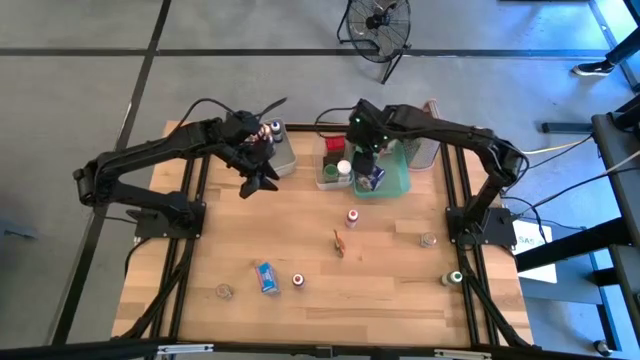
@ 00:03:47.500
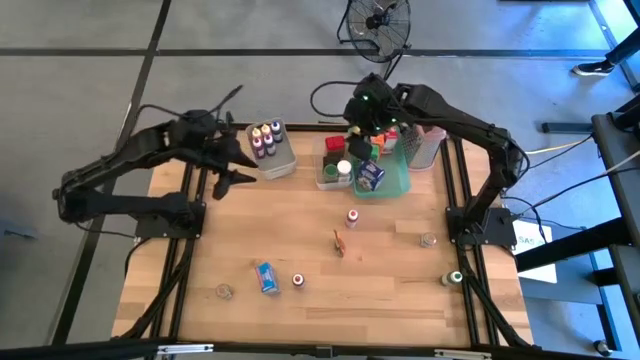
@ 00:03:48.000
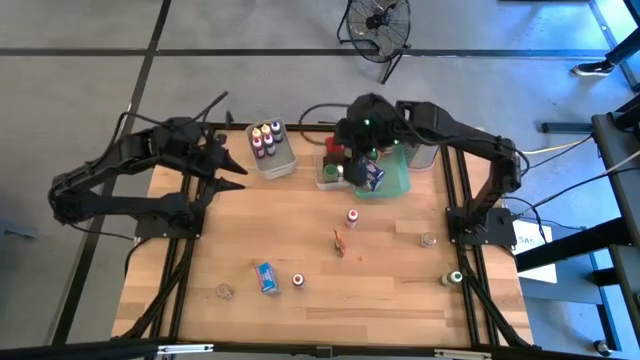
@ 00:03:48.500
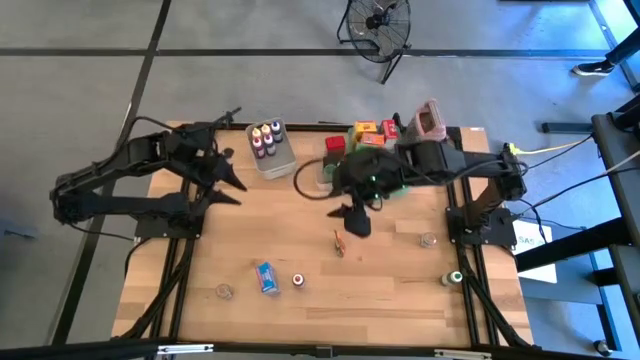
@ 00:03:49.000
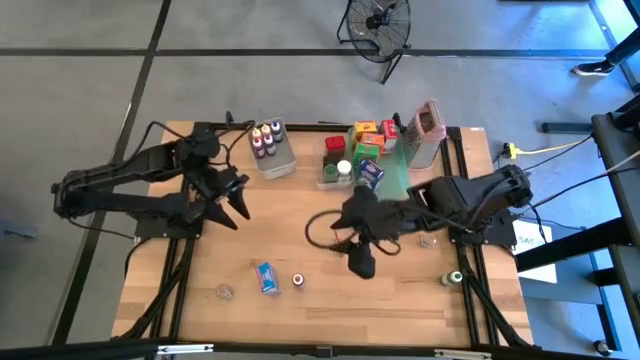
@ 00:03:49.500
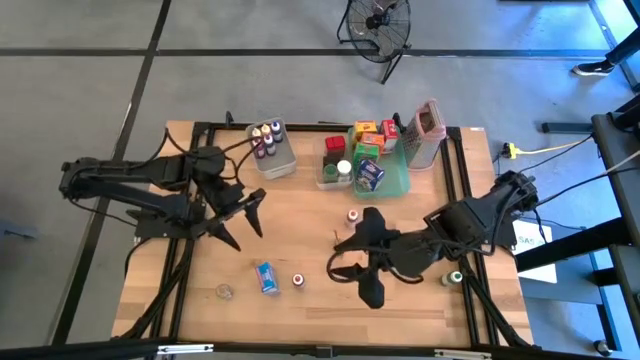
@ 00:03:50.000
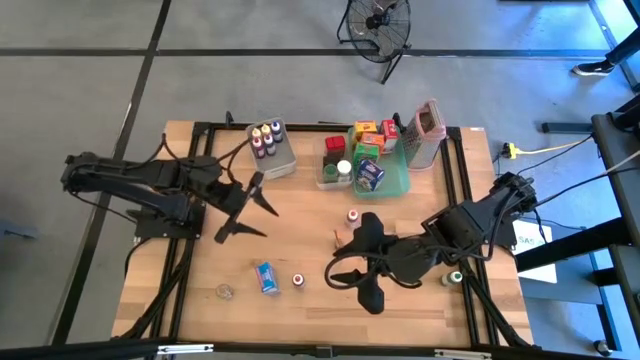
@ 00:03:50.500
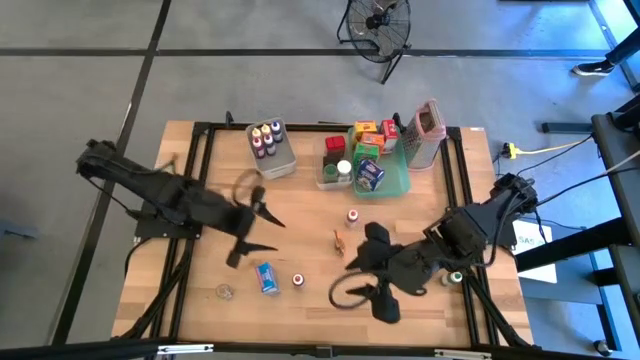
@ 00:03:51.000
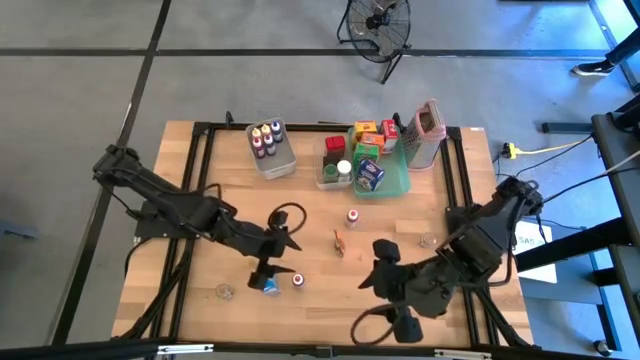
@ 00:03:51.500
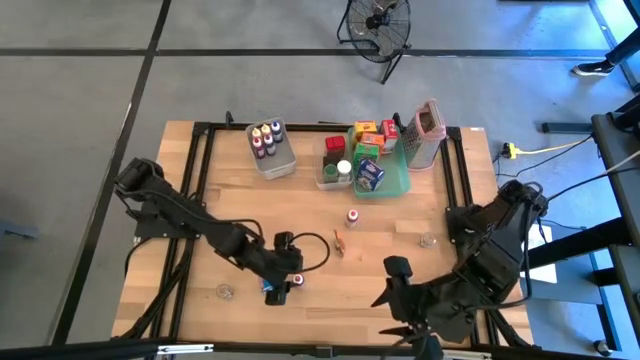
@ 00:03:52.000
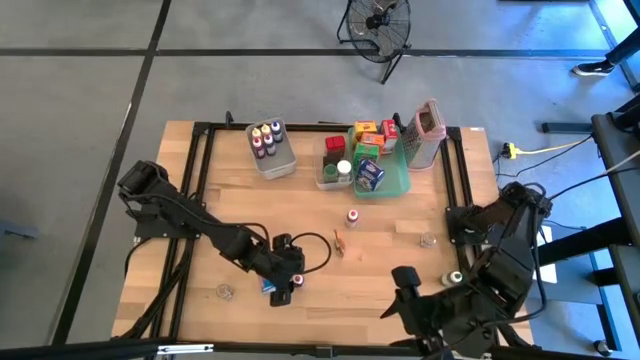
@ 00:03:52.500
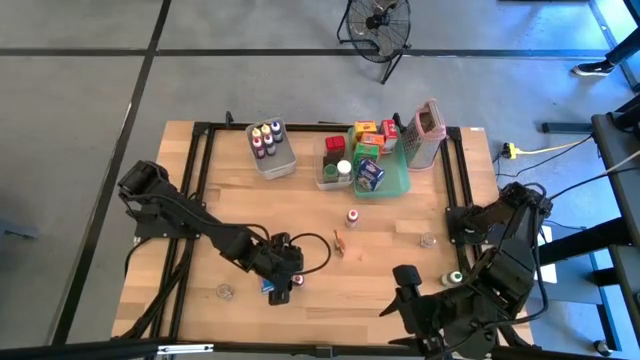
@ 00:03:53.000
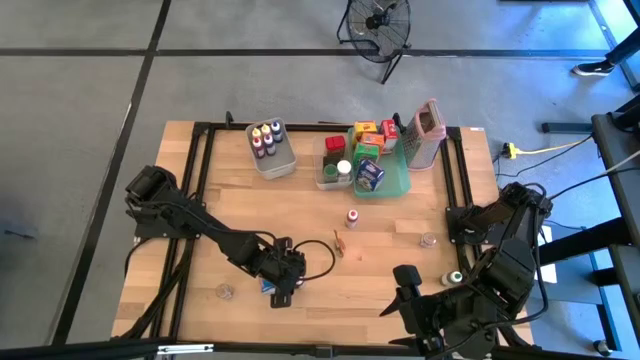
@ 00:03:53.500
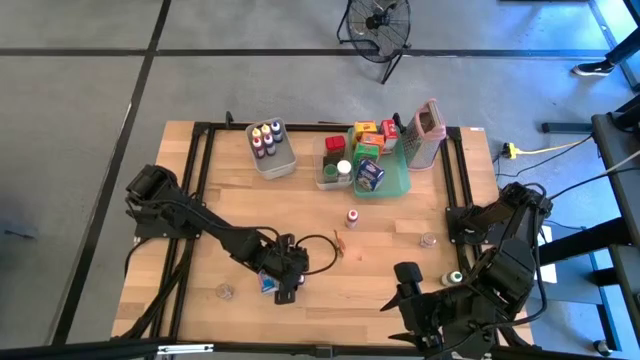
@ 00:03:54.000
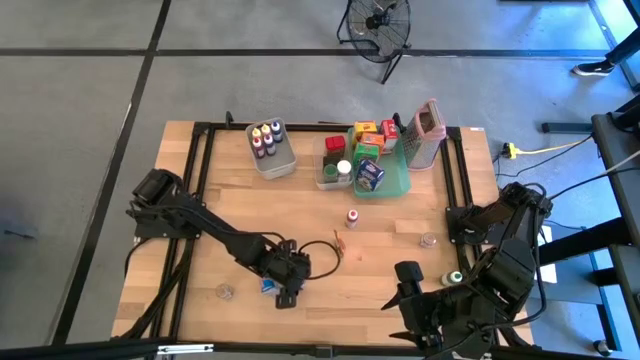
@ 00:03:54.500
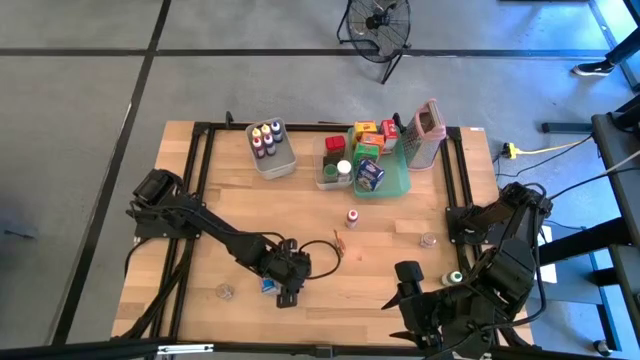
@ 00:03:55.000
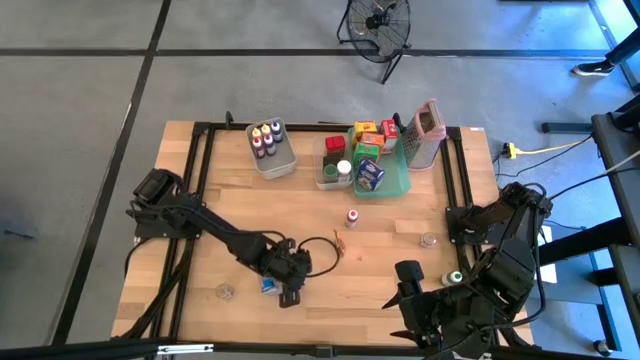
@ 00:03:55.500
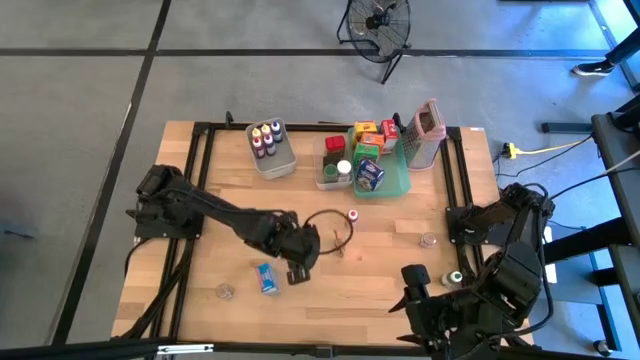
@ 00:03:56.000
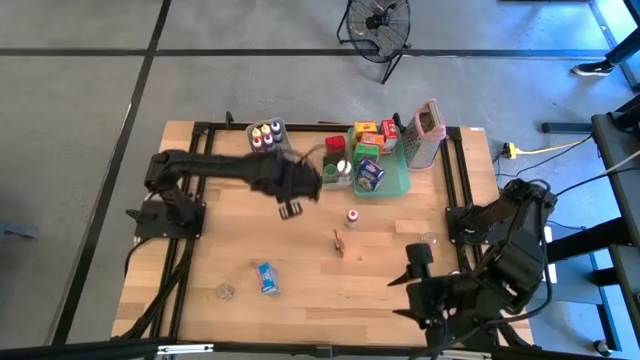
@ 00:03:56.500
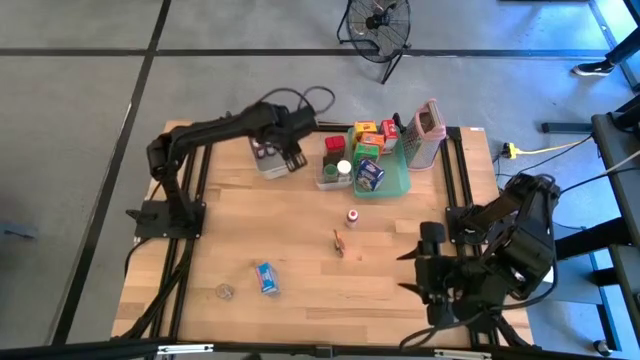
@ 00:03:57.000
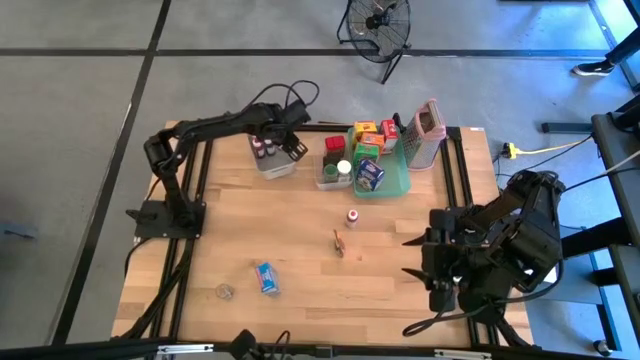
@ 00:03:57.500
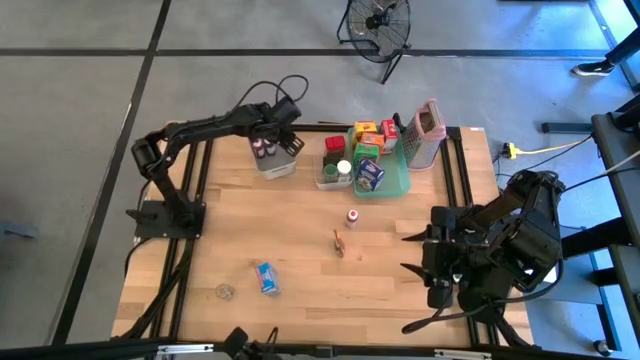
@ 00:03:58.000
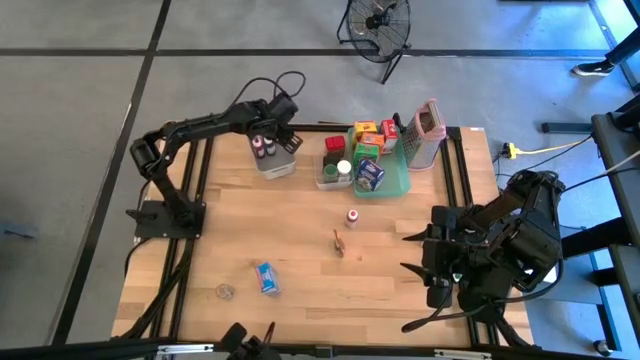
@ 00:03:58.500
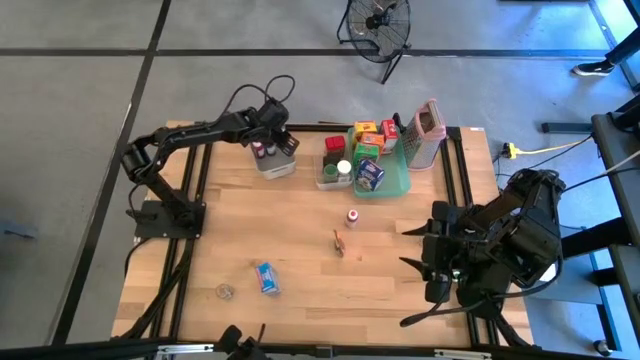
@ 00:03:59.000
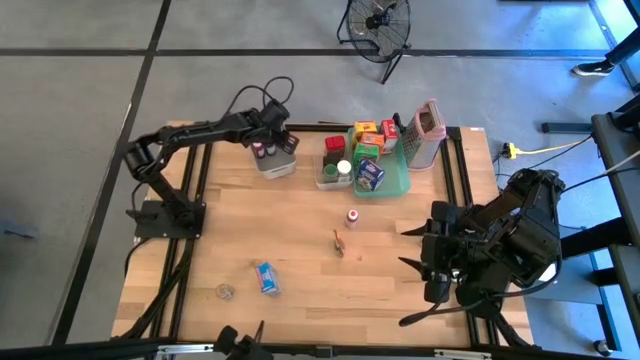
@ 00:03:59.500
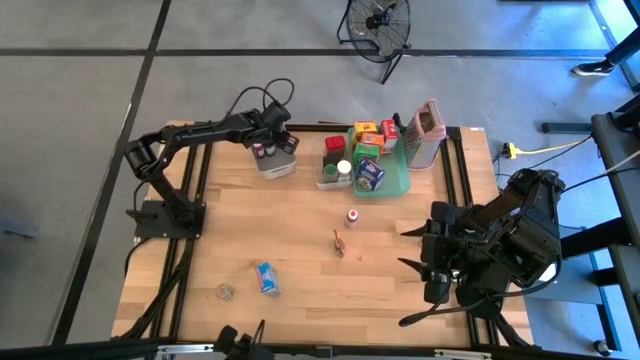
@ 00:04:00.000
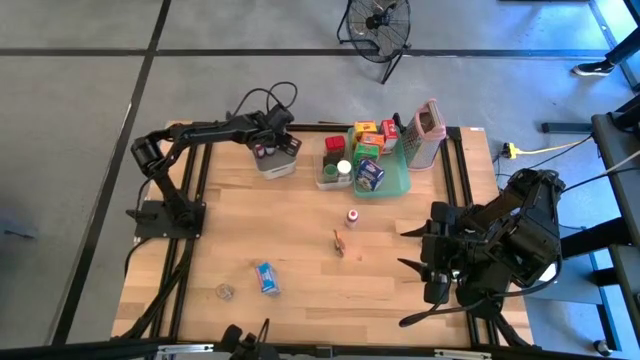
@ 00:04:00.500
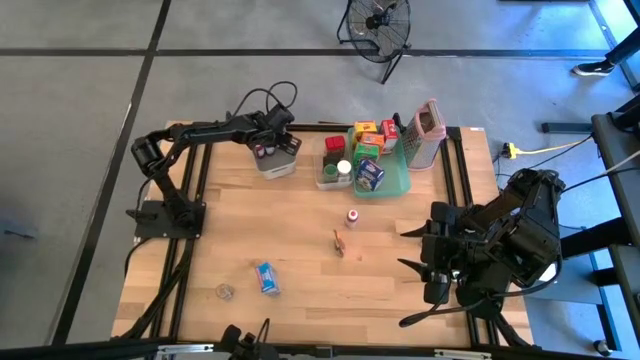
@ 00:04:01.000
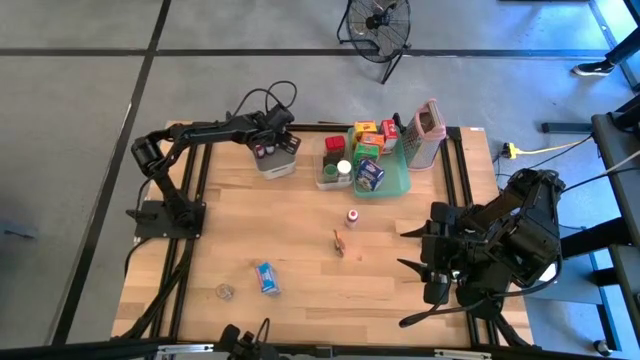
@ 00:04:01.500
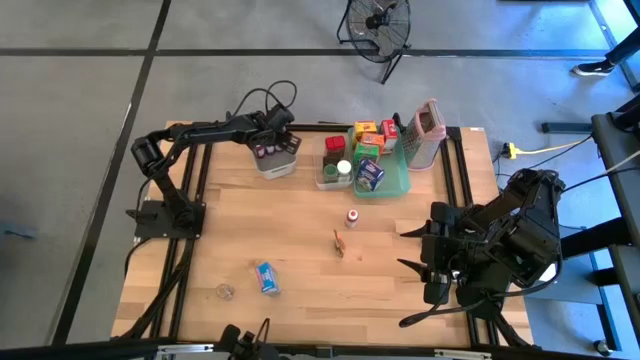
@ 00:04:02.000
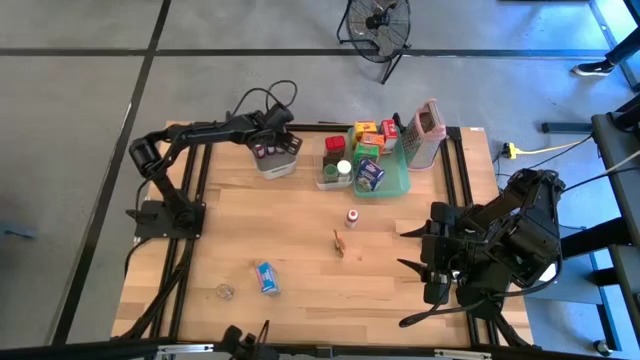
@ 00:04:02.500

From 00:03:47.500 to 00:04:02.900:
Task: Pick & Place Kitchen Items
Put the red food coloring bottle into the gray bin

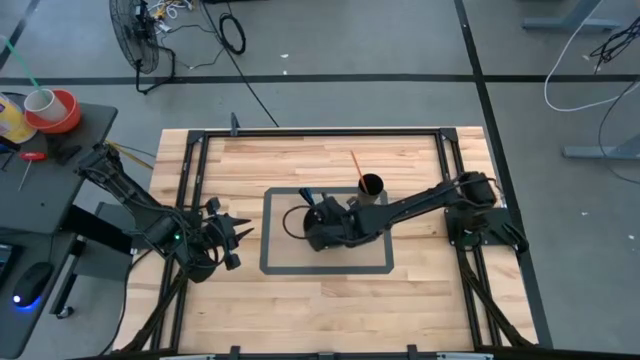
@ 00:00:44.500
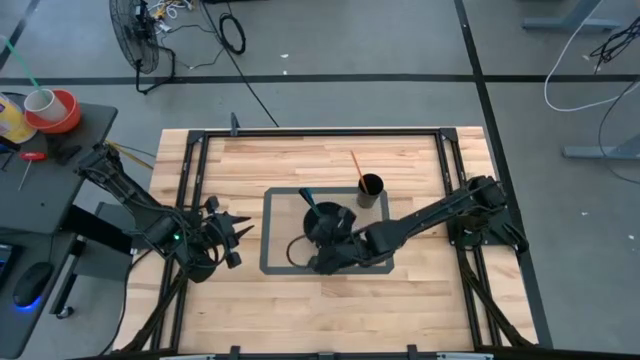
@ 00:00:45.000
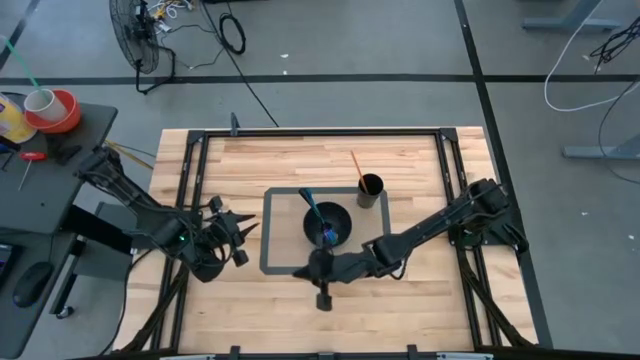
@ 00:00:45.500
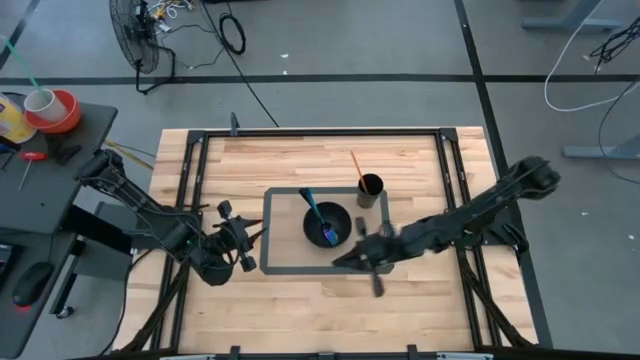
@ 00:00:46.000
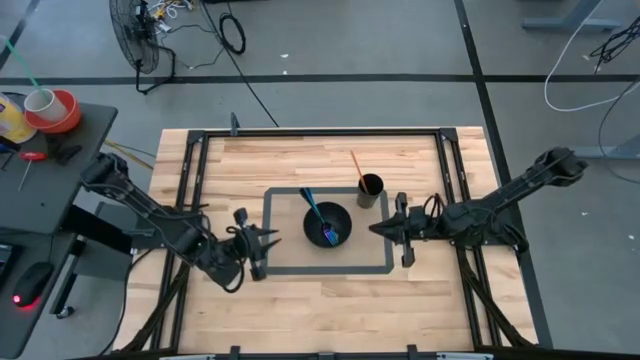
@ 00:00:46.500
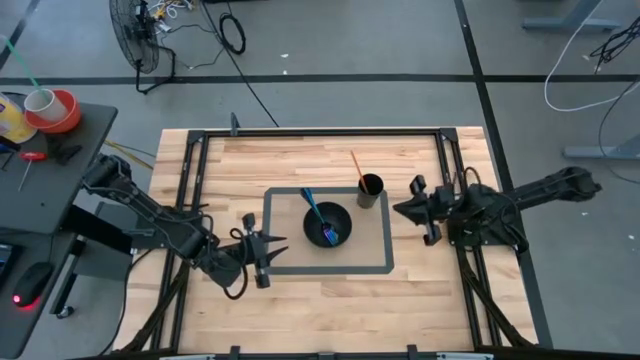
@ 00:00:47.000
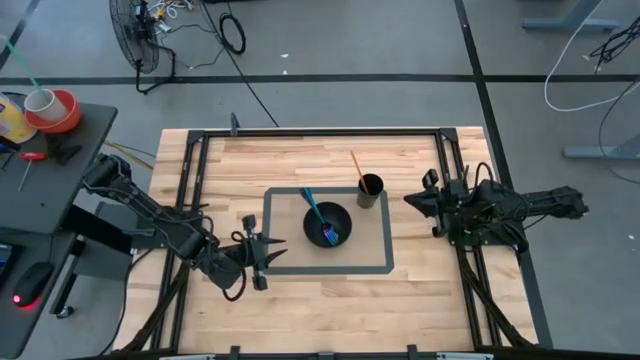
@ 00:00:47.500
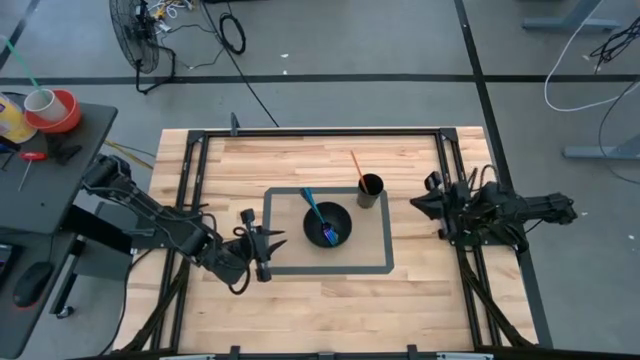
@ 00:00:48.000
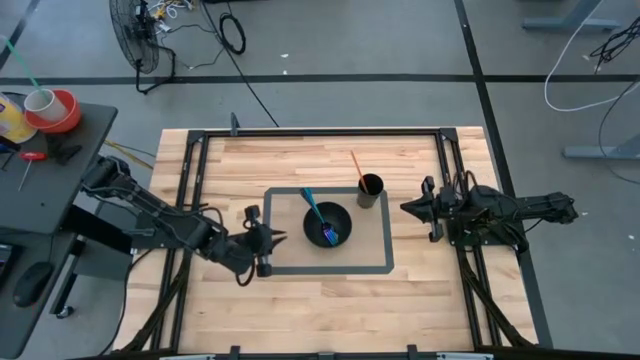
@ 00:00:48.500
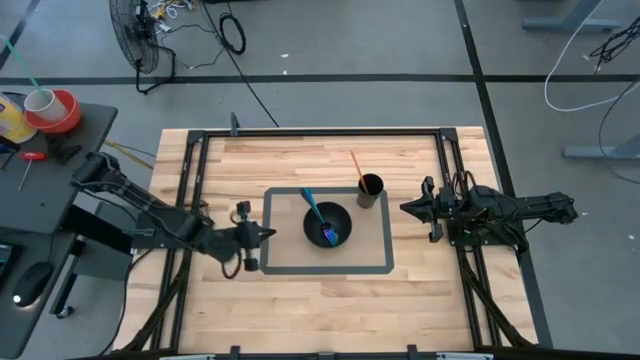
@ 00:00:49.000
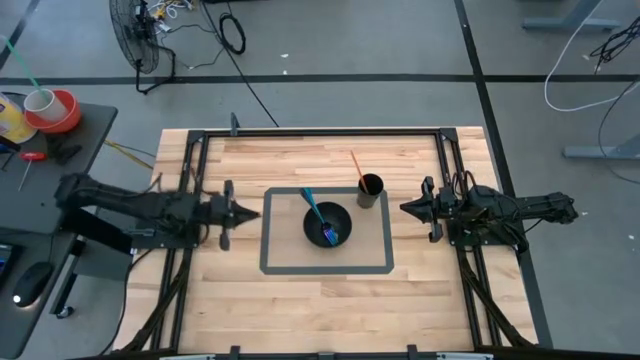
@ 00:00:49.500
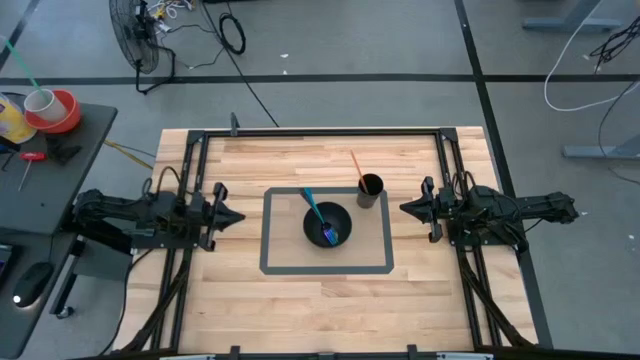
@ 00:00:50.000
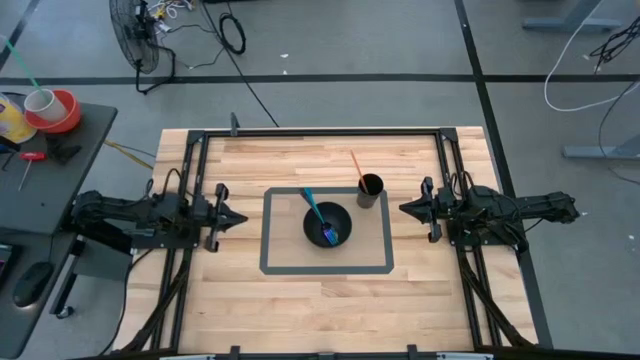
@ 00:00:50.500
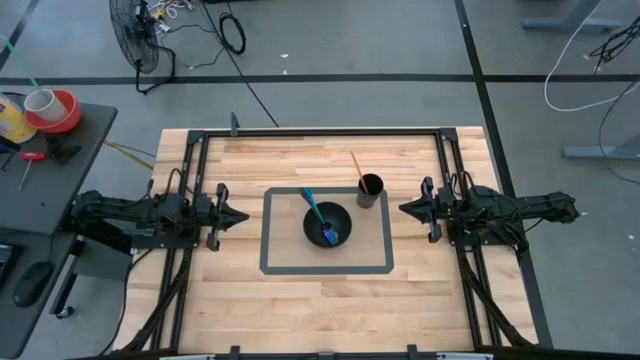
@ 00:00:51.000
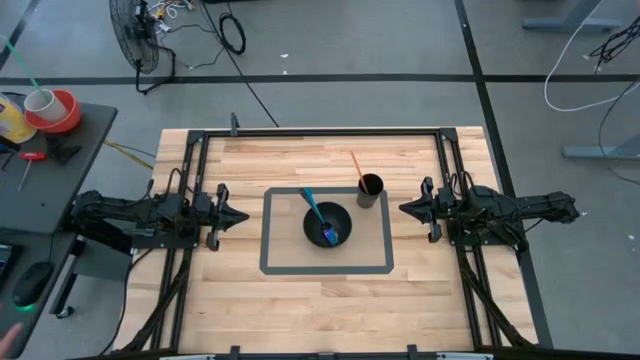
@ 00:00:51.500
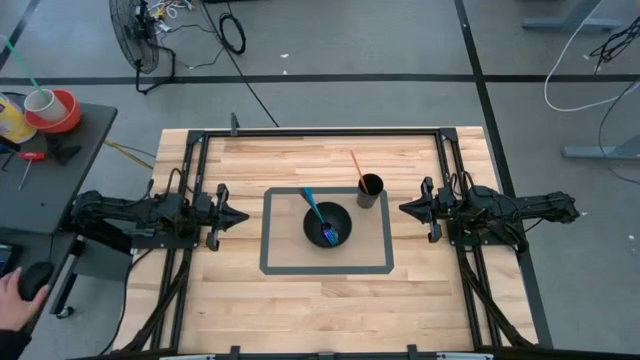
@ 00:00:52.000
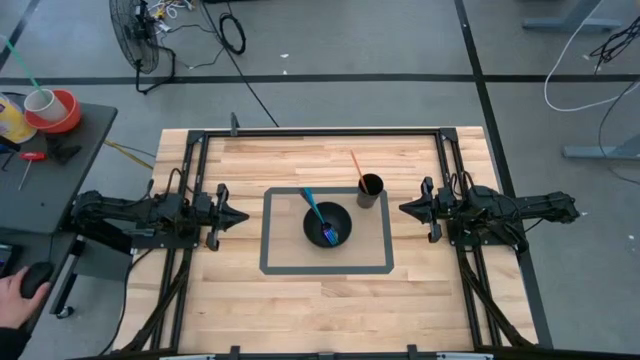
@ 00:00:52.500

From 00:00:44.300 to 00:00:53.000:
Task: Pick & Place Utensil
Return to Home Position
